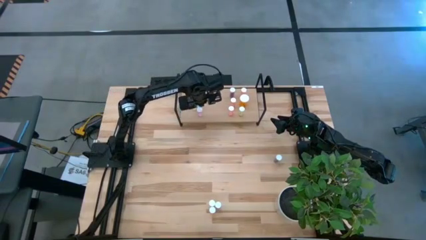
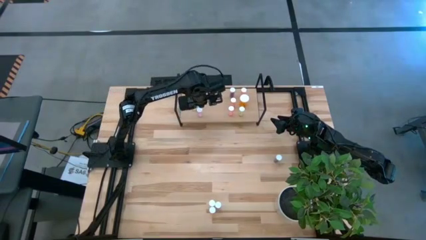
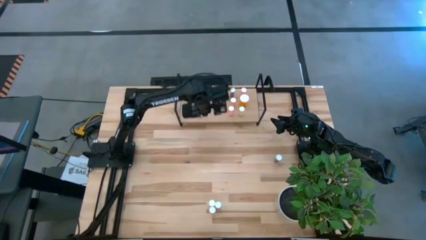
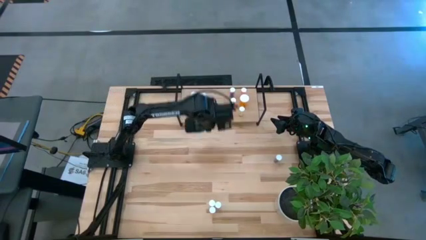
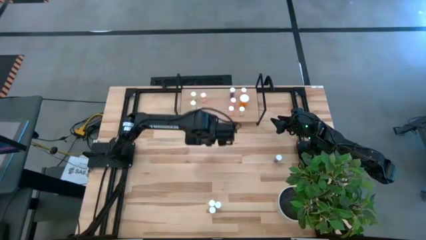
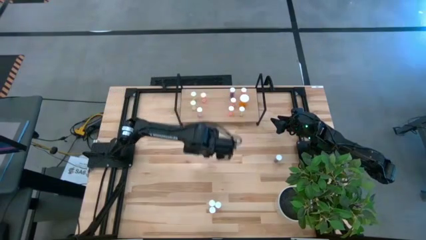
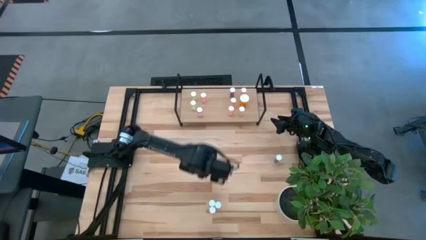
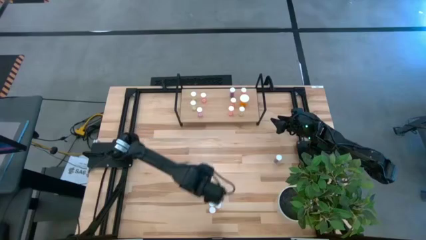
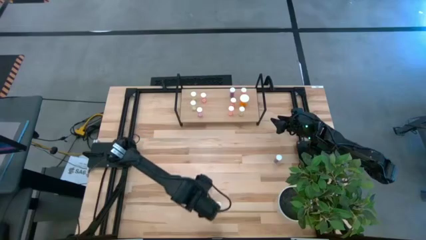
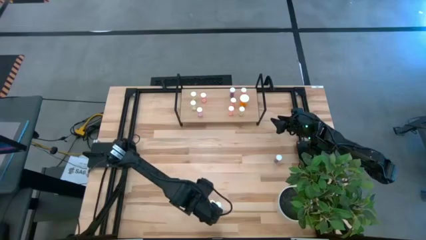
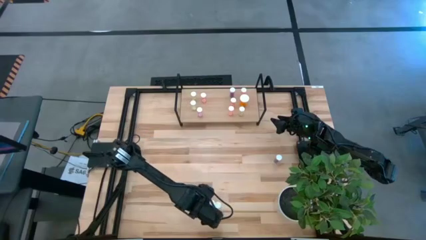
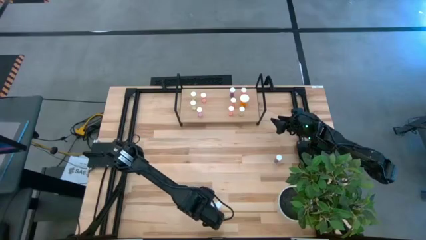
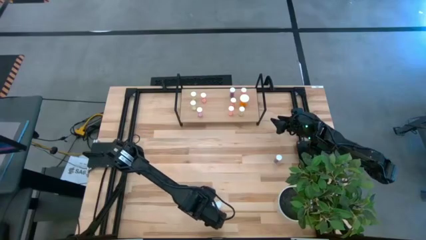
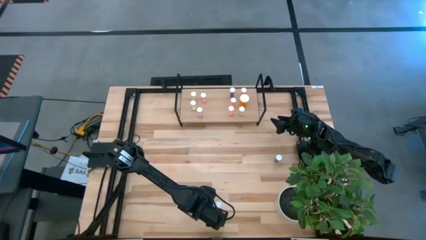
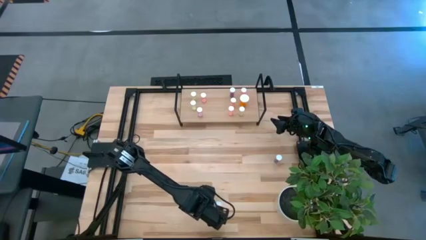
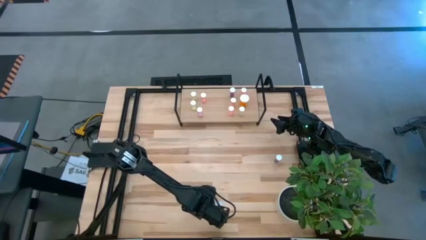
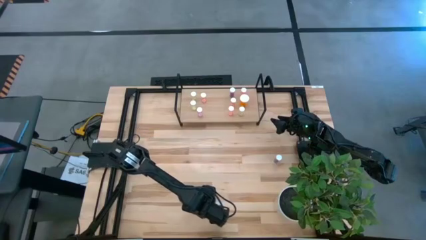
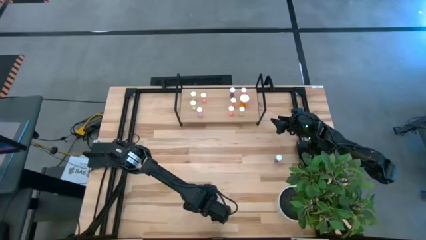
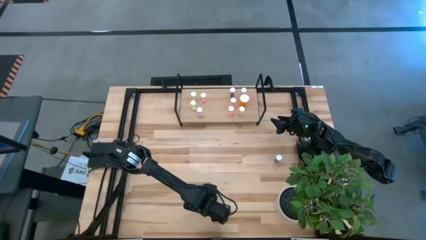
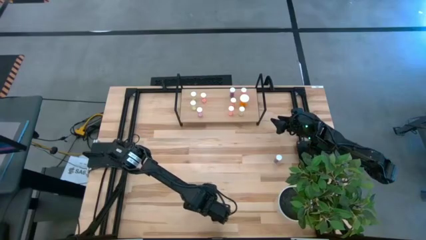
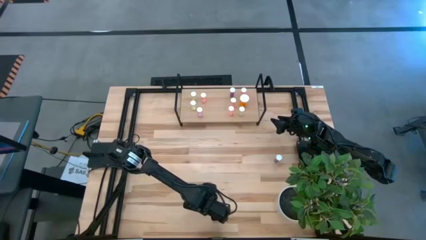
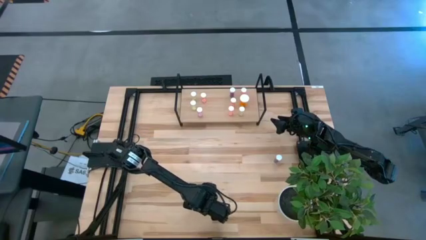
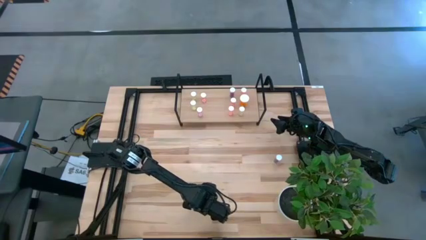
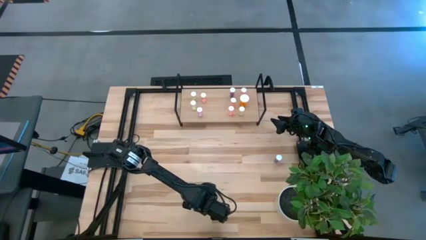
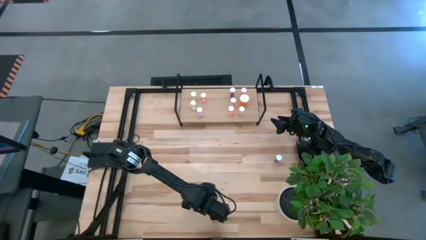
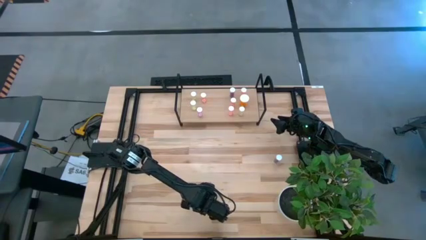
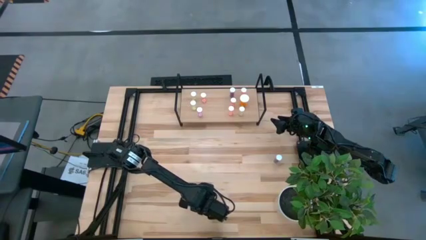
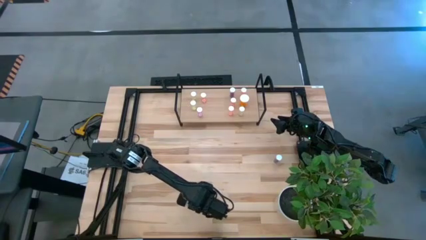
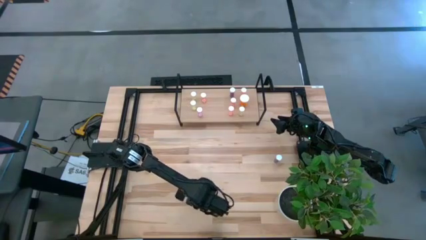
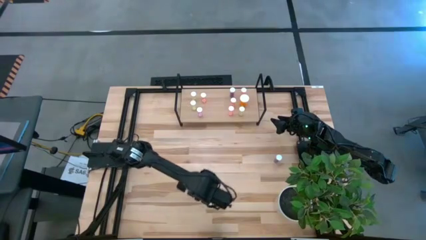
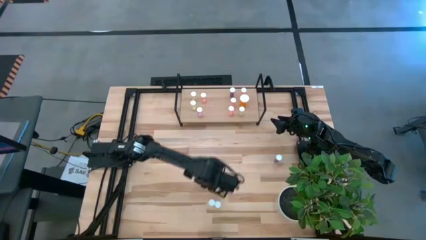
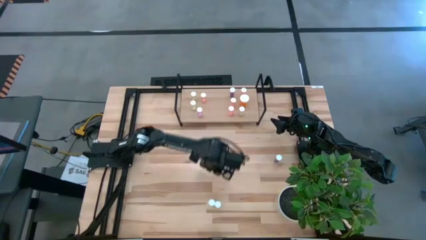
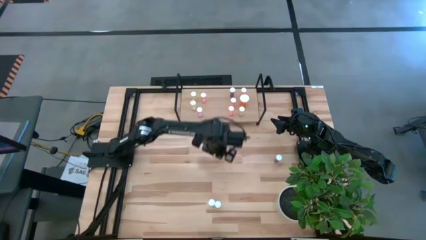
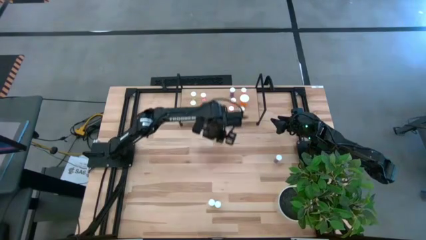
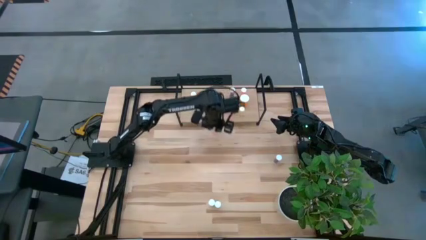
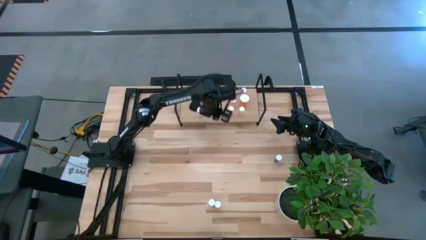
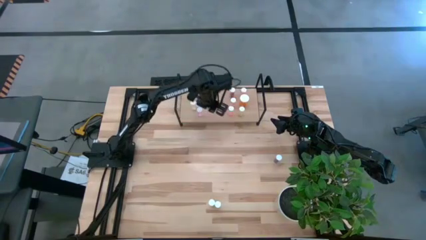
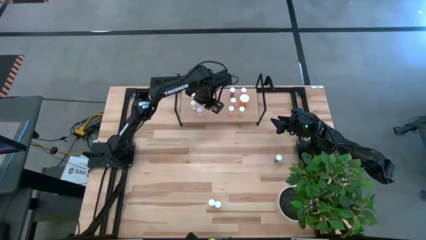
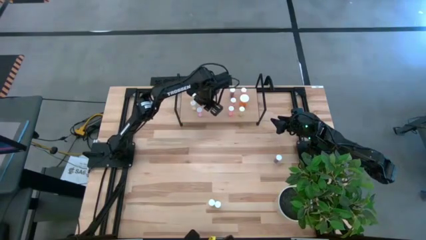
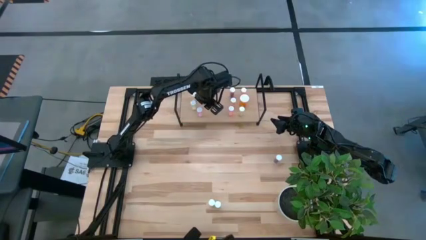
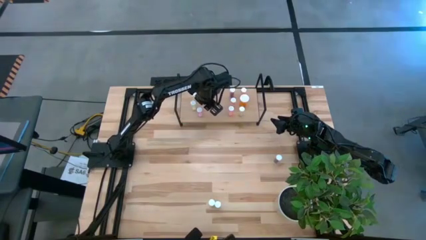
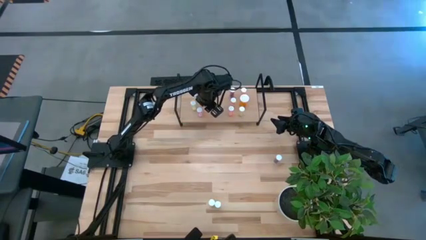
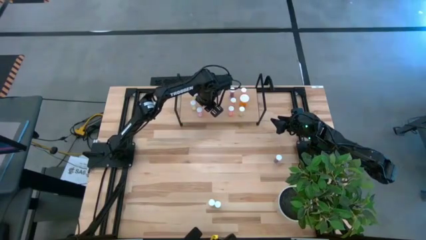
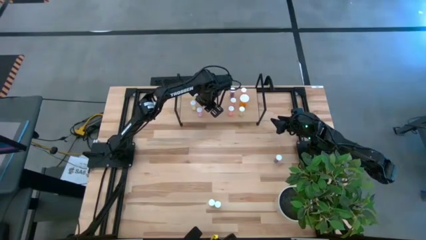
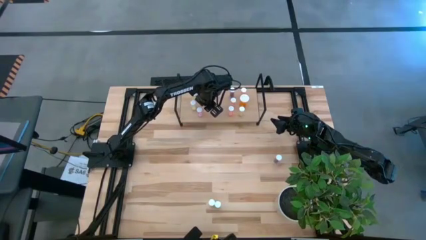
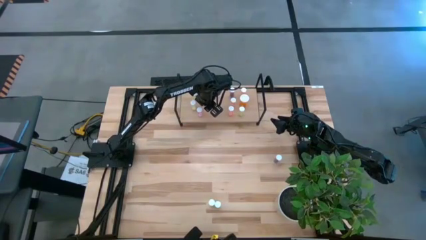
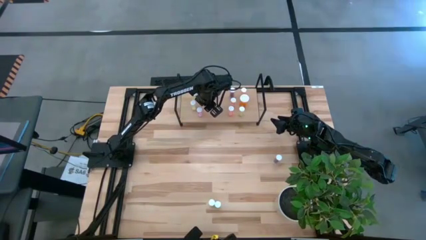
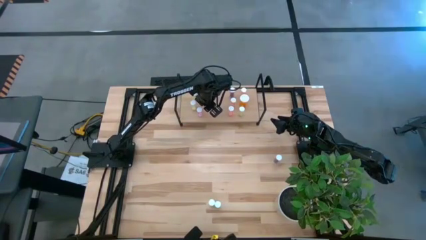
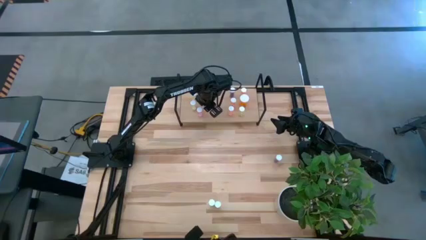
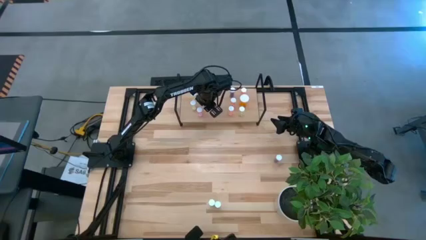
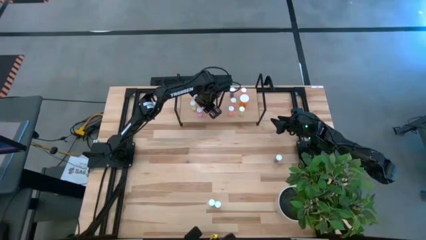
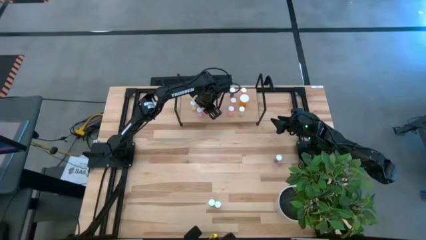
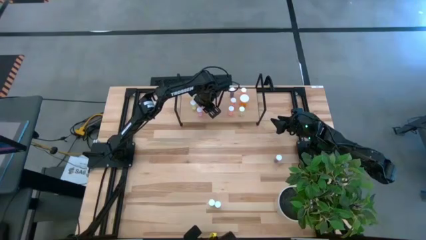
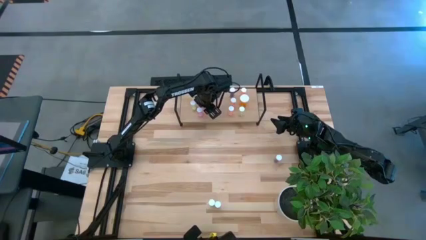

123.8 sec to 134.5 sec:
Task: Pick and place medicine bottles onto shelf by color
Put the pink pill bottle on the shelf

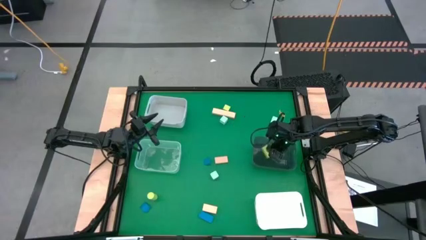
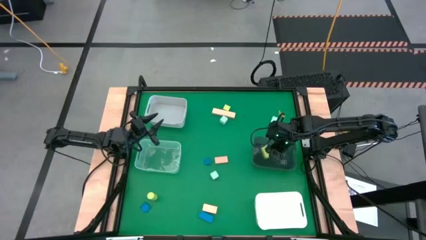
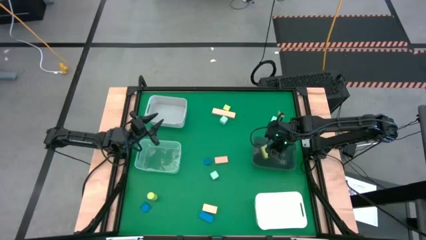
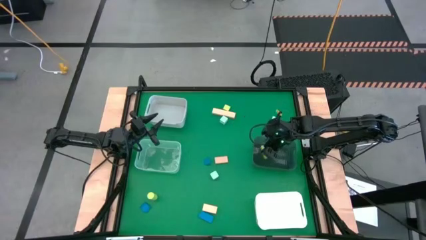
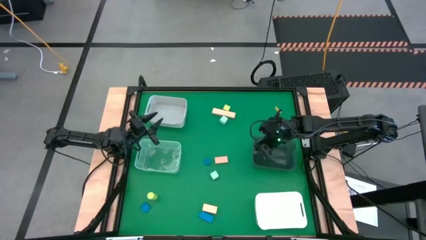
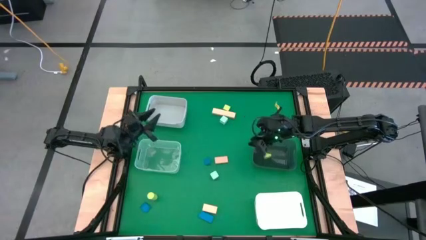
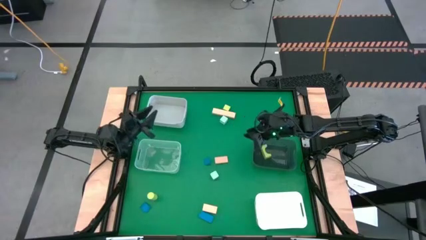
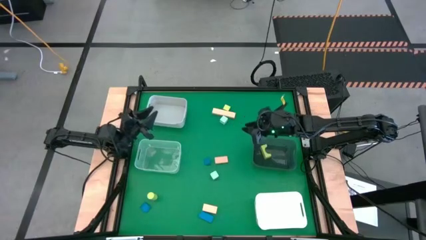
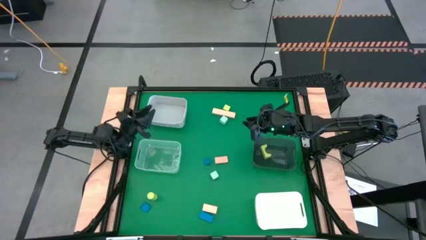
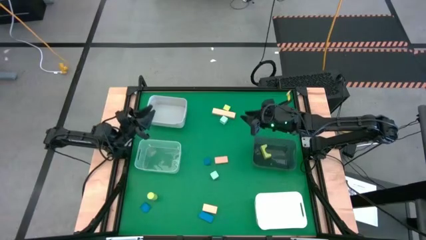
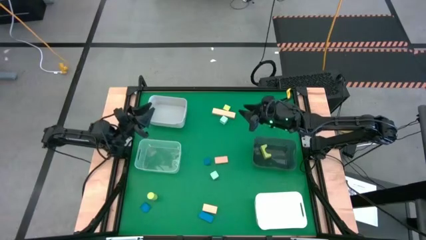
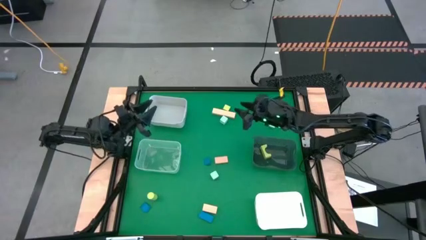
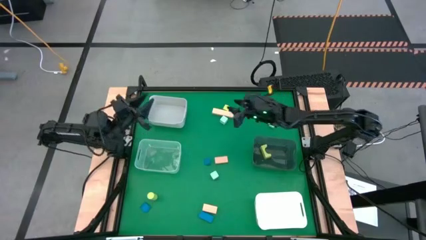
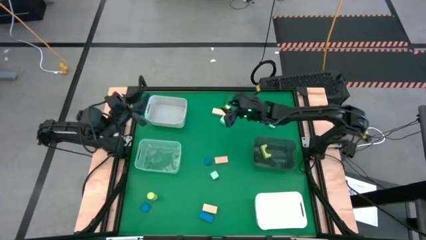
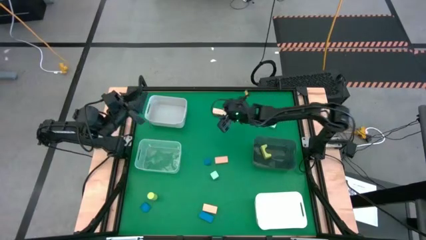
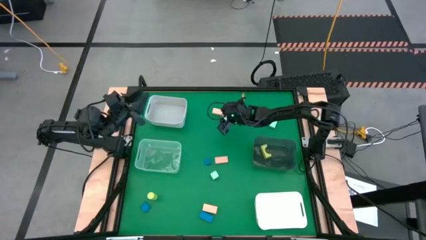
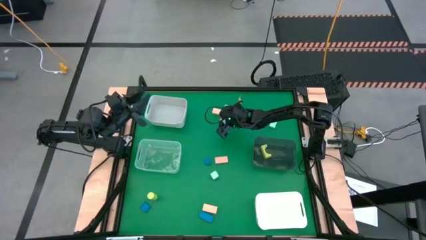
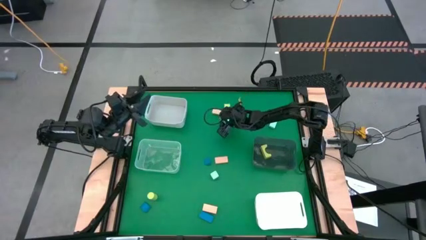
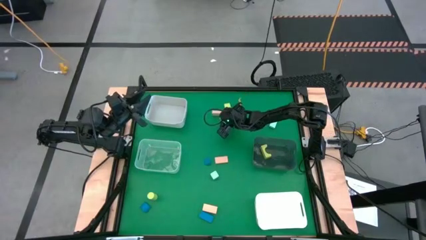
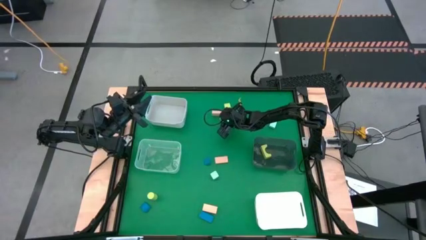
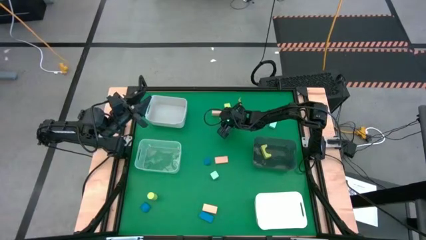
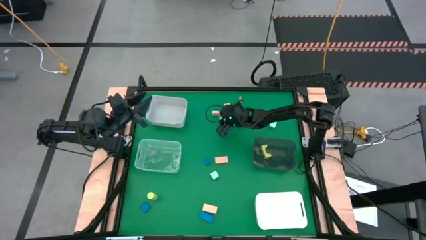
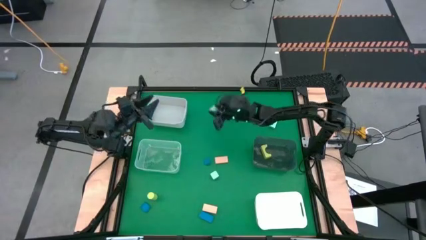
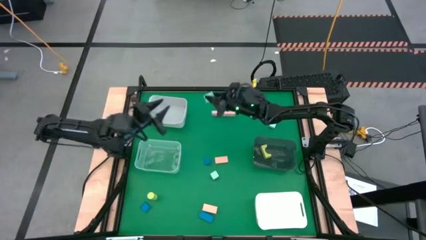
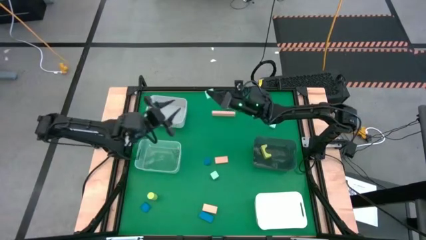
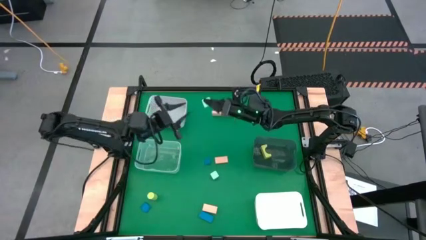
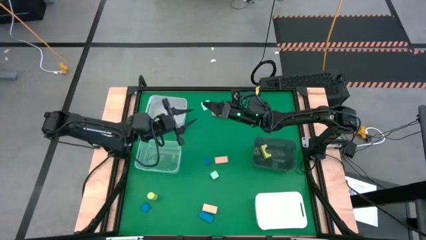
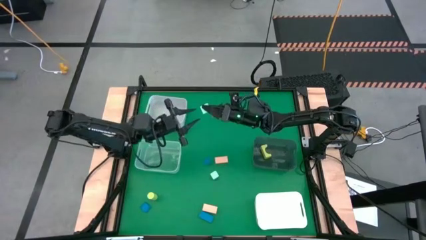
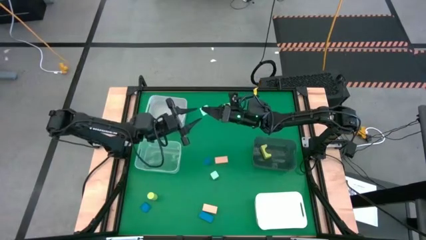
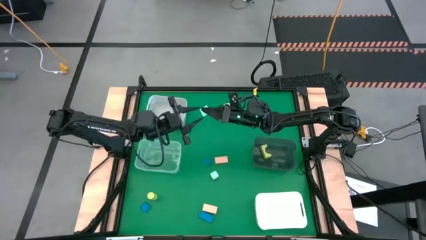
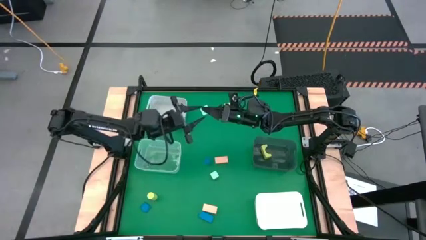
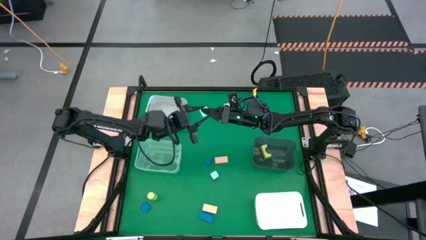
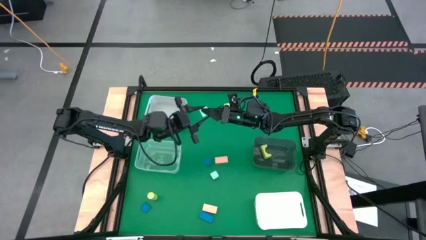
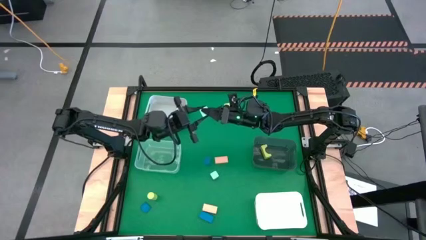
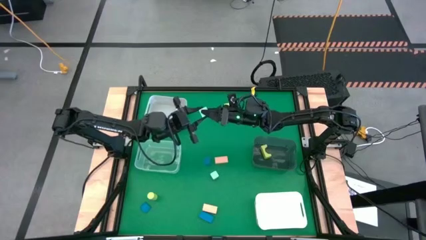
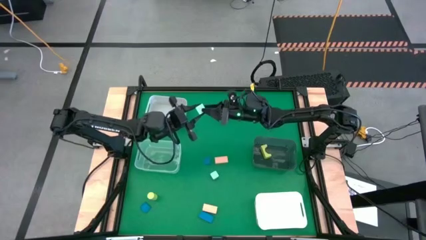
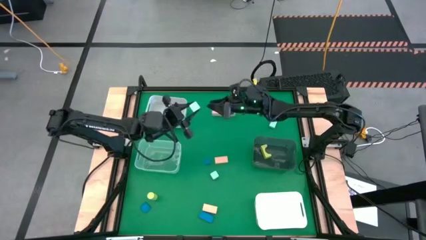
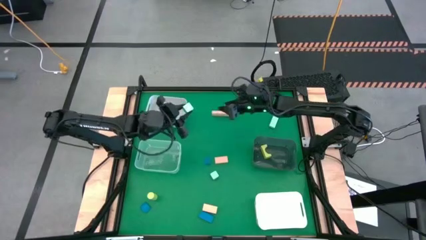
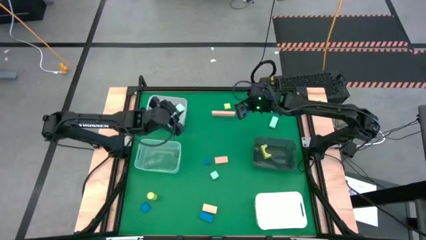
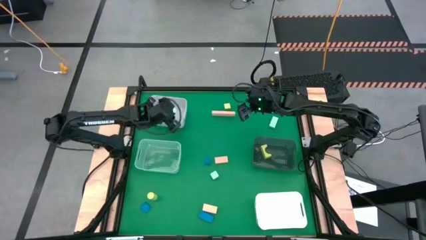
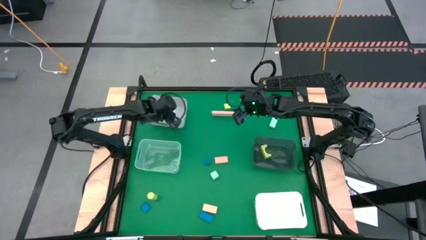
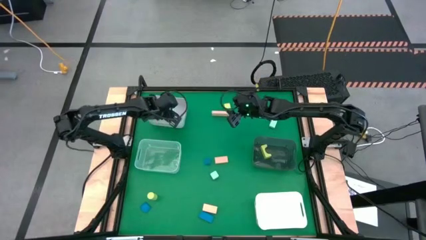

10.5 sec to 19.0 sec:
Task: Sort & place blocks by color
Put the top left light blue block into the gray bin
